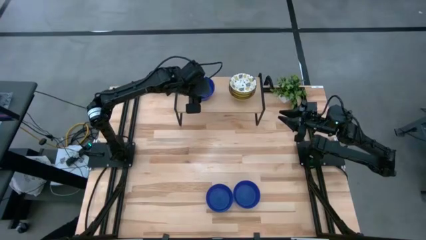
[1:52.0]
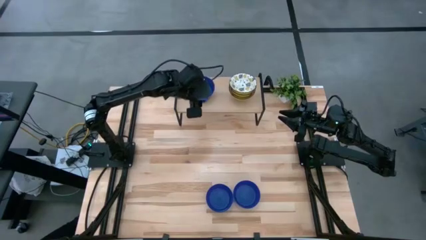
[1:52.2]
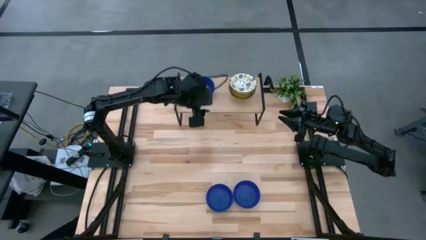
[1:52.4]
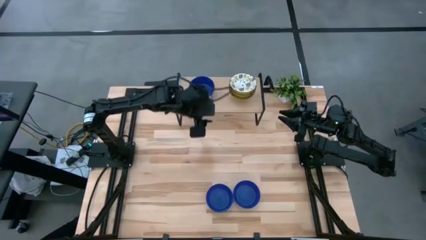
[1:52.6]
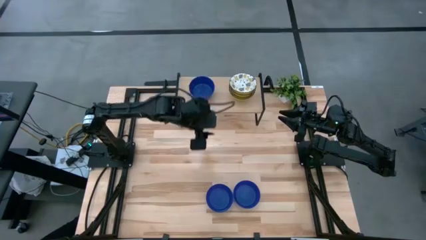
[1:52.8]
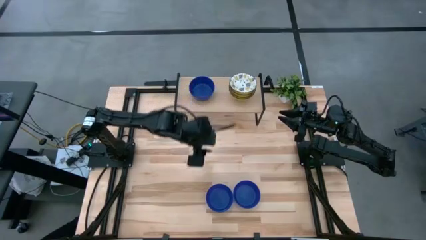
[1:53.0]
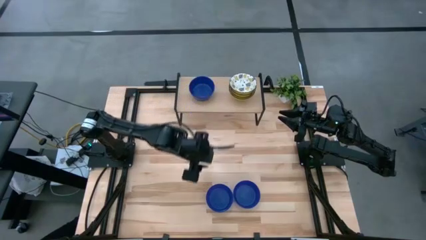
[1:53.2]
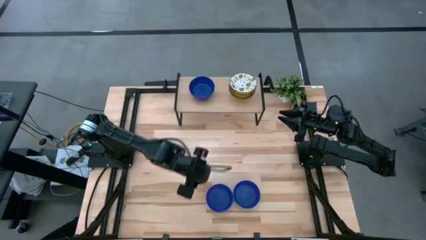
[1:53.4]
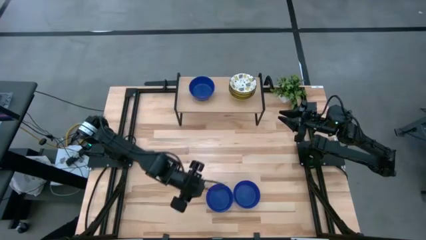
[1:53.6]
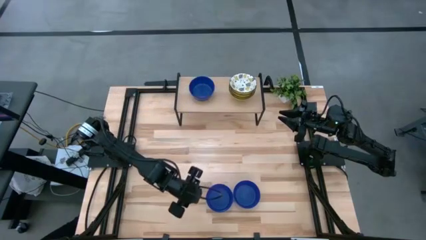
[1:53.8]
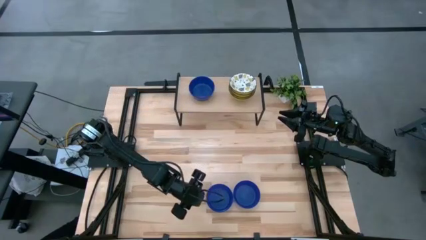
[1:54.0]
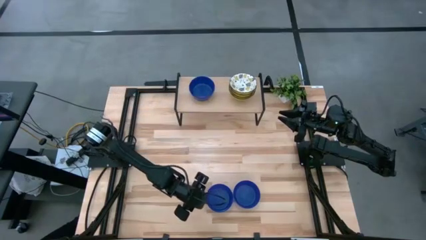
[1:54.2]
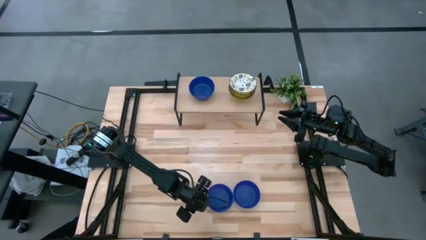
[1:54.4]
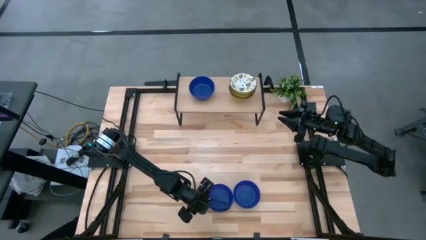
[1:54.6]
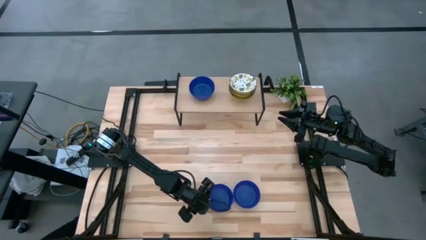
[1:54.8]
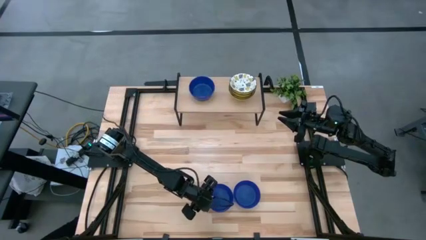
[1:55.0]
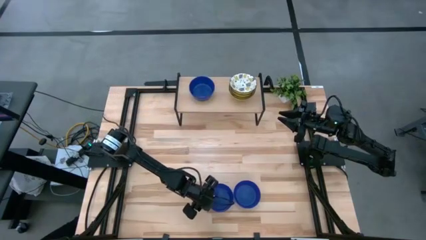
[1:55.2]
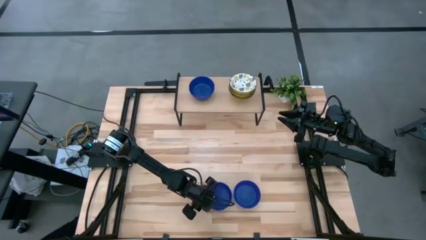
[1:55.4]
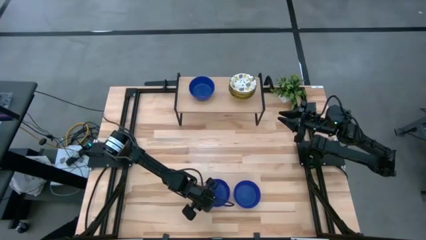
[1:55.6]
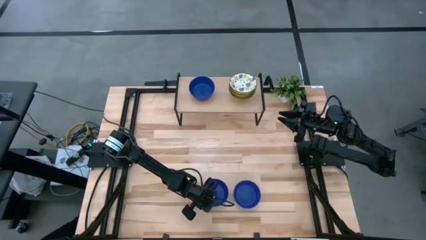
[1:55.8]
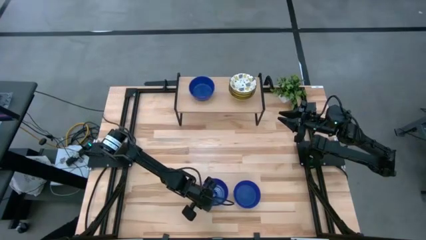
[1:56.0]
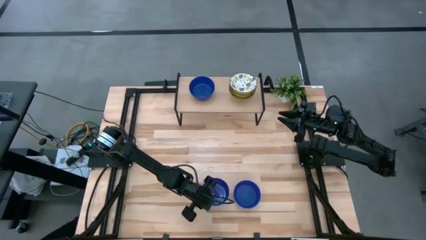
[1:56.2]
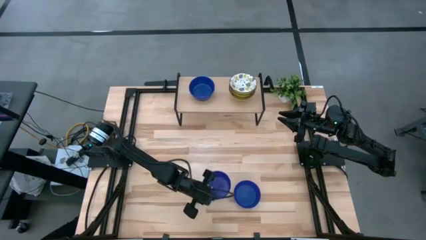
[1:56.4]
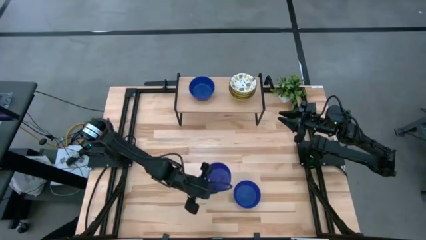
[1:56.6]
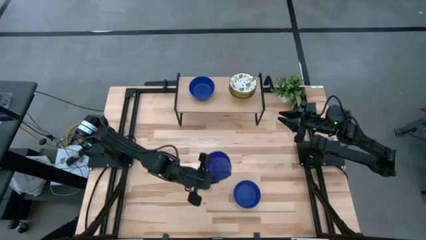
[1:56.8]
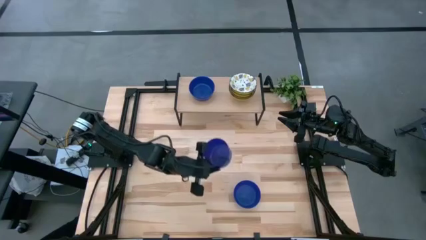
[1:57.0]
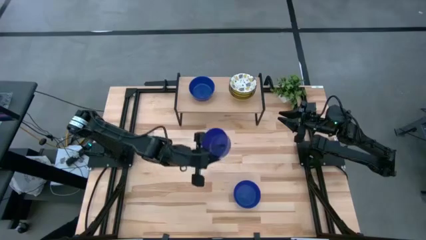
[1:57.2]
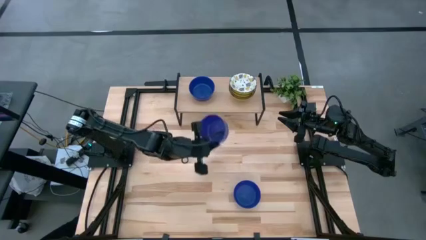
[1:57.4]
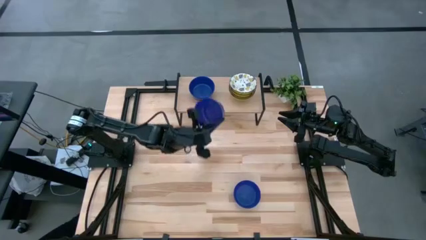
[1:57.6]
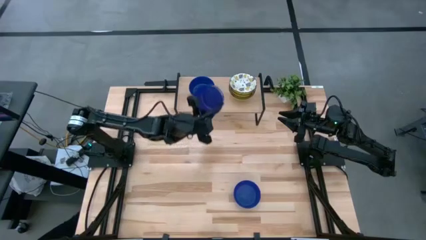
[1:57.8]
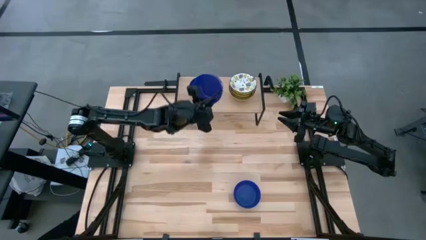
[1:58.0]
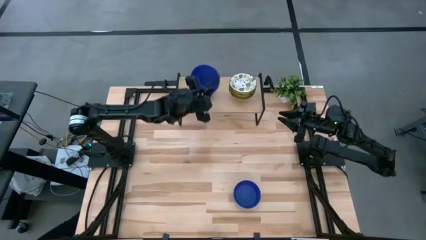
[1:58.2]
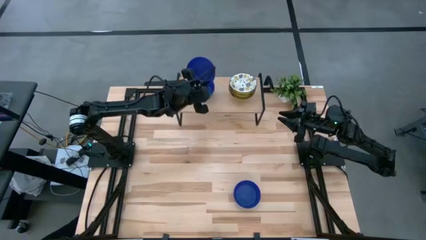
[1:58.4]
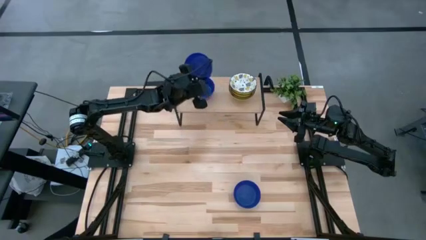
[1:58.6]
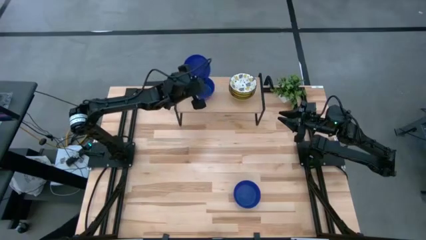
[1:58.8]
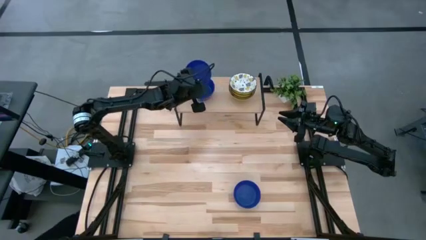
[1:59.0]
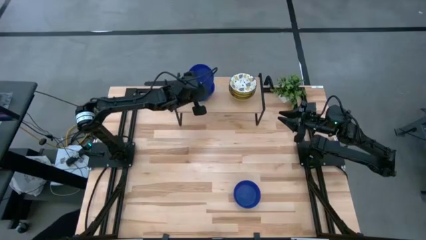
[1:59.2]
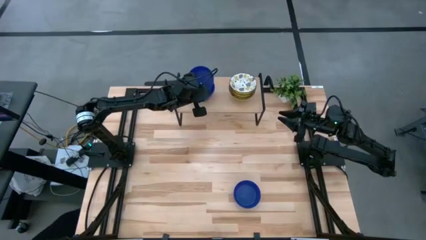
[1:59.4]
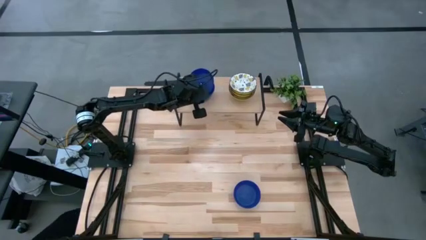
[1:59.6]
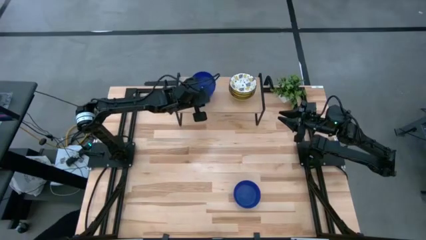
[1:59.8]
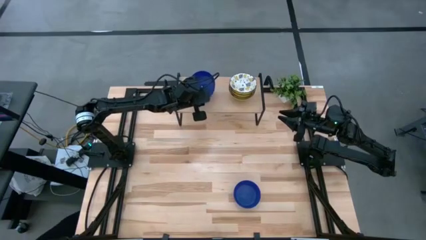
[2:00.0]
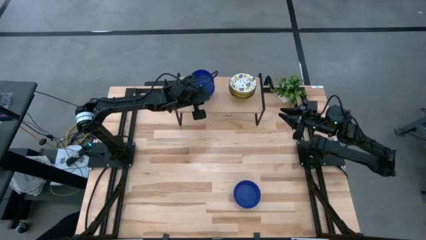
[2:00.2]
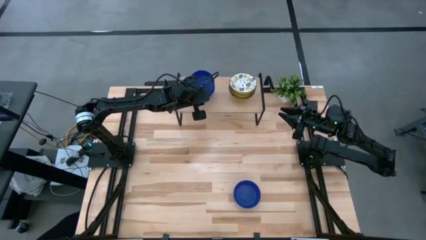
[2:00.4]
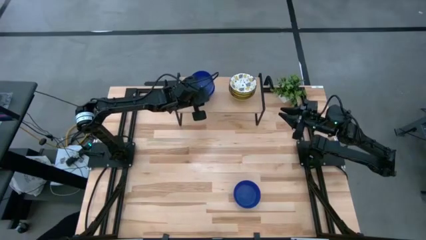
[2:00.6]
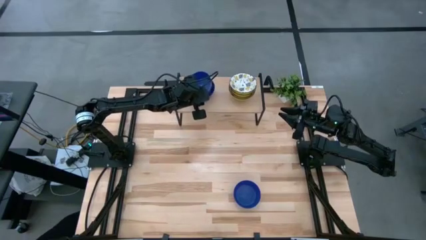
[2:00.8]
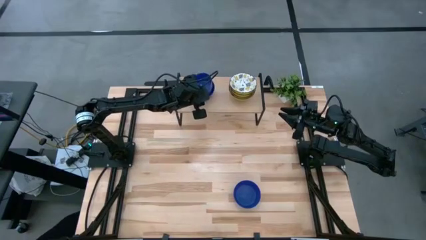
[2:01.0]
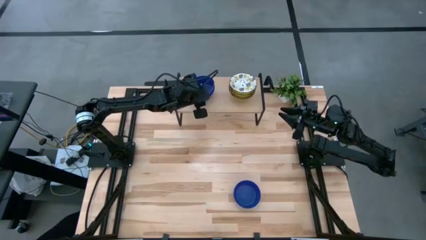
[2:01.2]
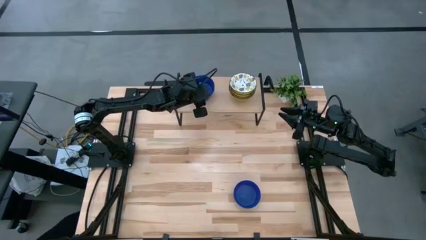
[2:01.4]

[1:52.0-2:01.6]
Task: Pick & Place Mini bowls
Stack the blue bowl on top of the blue bowl on the shelf

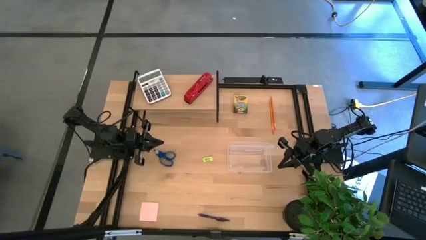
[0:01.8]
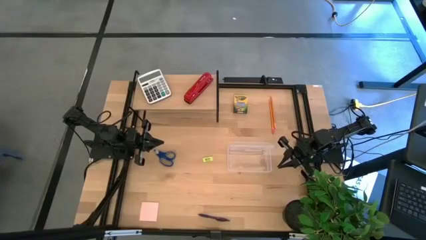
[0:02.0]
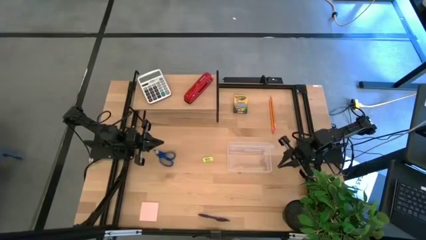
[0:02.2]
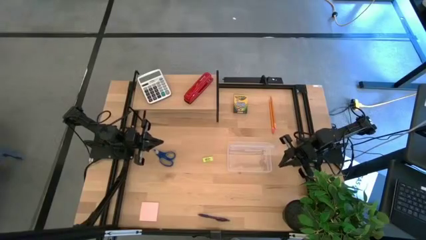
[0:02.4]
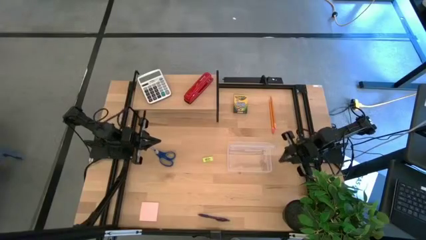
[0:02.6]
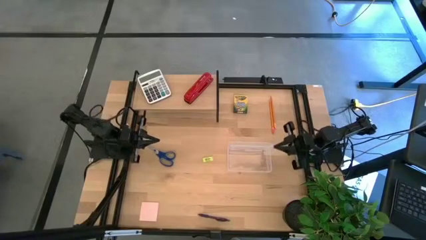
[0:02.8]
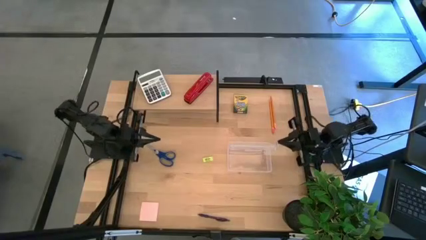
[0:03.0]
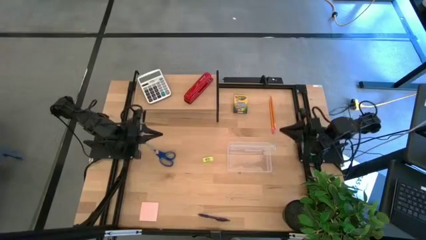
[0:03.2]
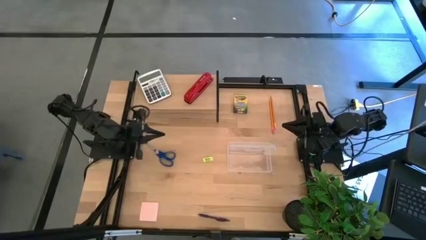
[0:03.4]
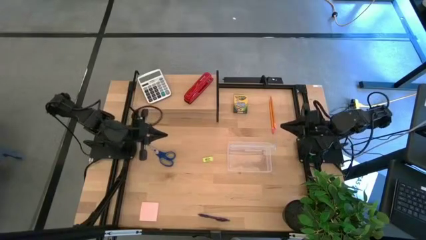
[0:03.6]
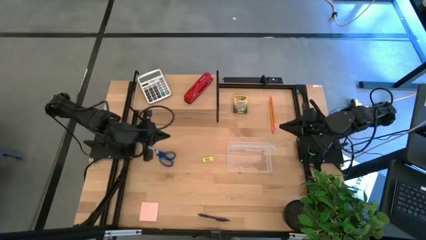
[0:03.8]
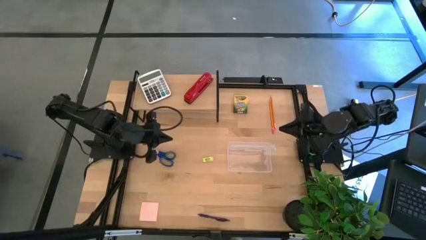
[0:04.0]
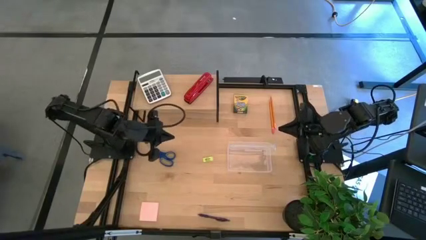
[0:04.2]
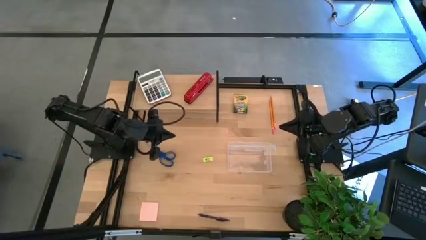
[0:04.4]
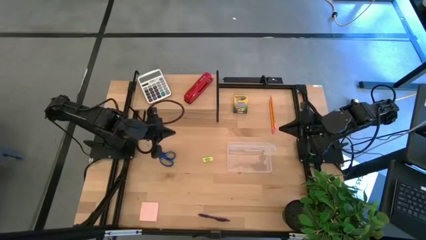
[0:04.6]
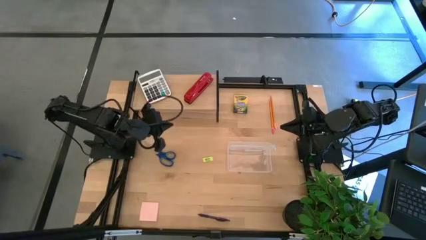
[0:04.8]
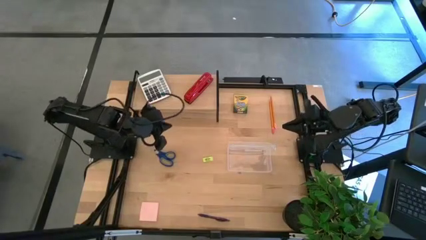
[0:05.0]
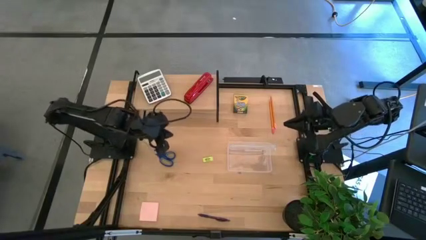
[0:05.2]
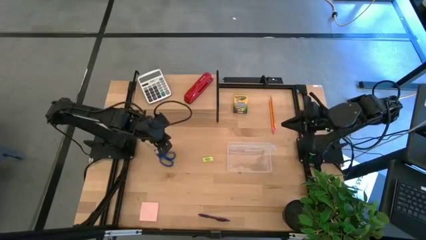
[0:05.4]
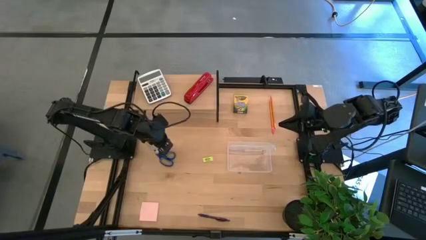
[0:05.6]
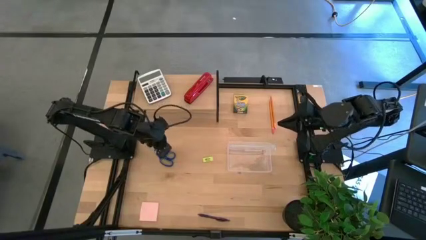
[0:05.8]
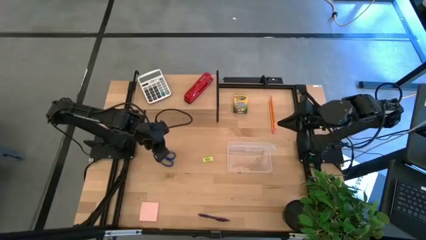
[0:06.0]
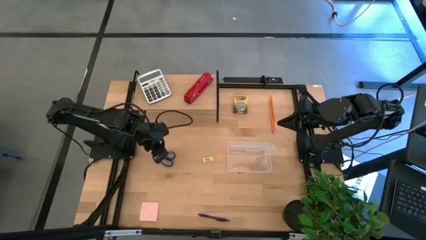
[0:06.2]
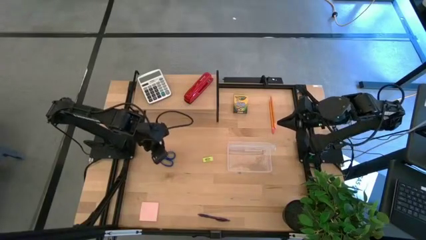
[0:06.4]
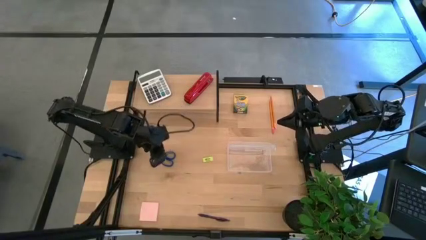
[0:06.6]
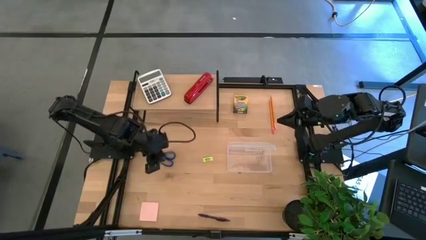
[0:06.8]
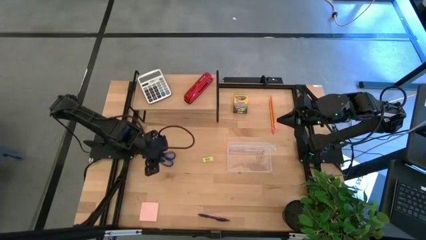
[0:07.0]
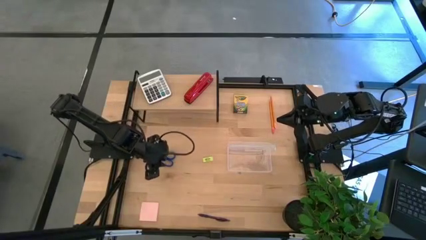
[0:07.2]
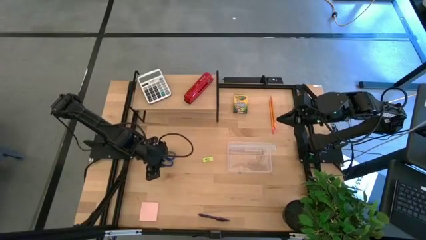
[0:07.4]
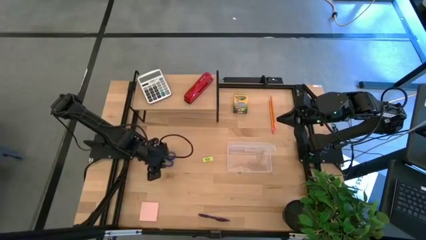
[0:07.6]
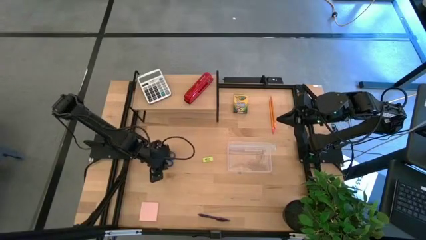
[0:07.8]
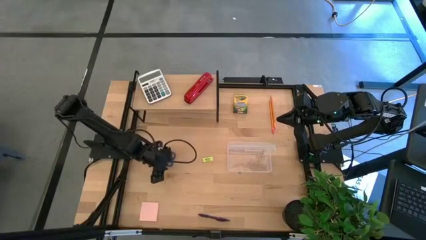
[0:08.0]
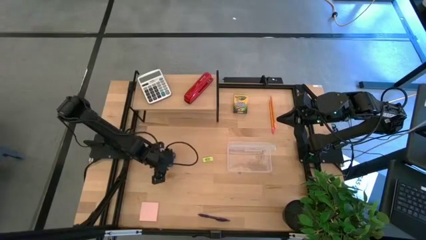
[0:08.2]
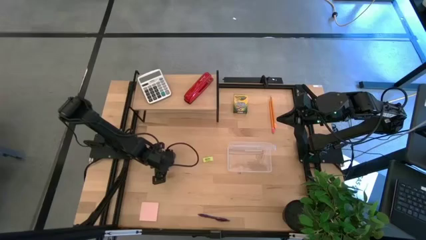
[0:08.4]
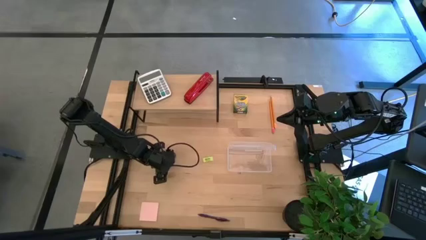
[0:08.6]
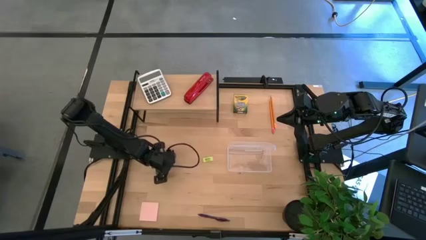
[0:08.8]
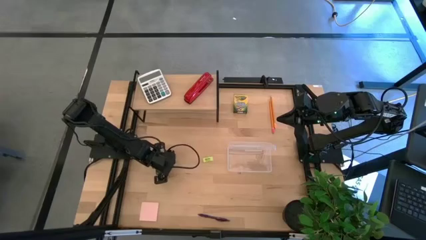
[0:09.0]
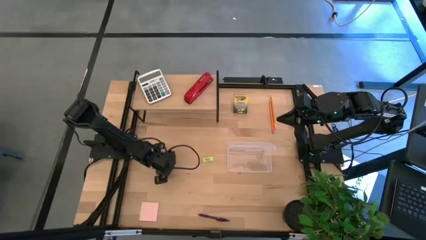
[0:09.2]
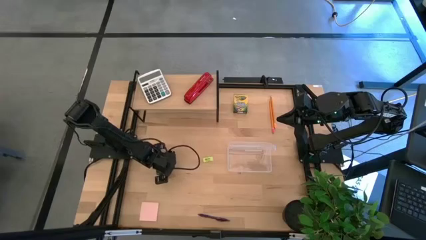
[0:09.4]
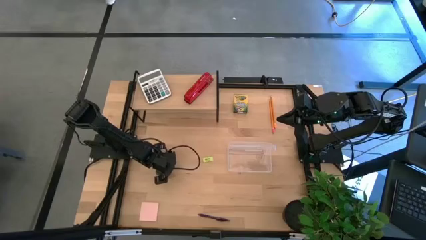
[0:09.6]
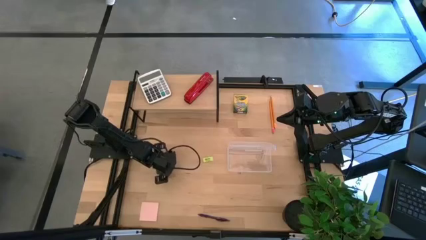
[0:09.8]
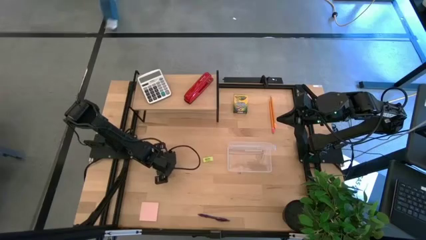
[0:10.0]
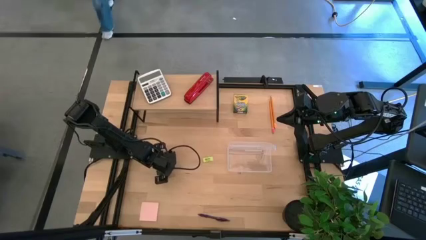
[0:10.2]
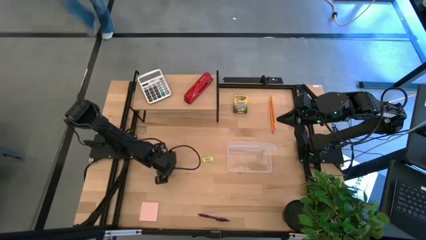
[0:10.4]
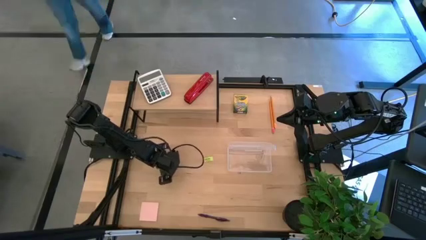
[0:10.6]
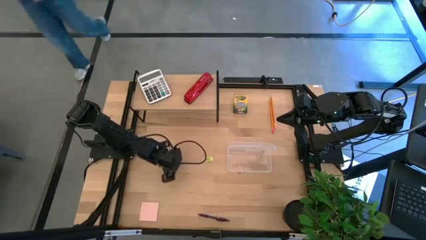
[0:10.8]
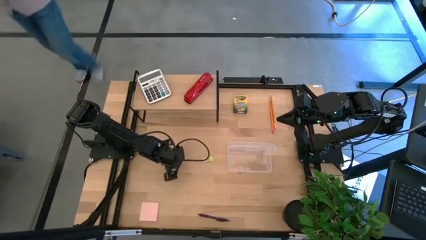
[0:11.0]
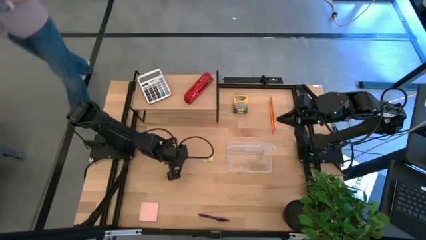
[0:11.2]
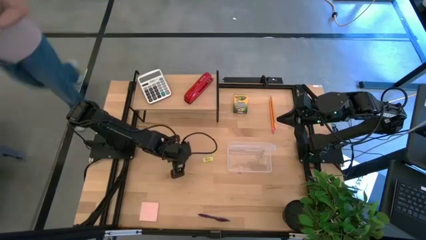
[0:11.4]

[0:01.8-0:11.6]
Task: Pack school essentials
Put the blue scissors into the supply box
